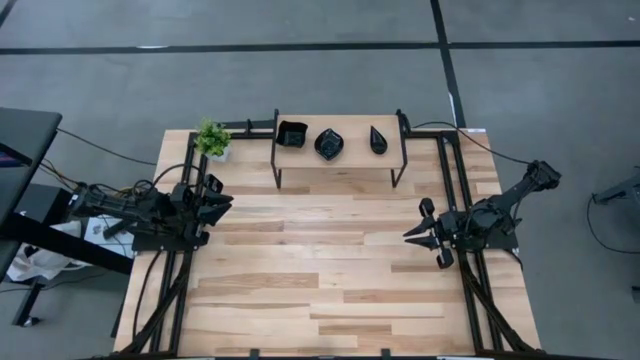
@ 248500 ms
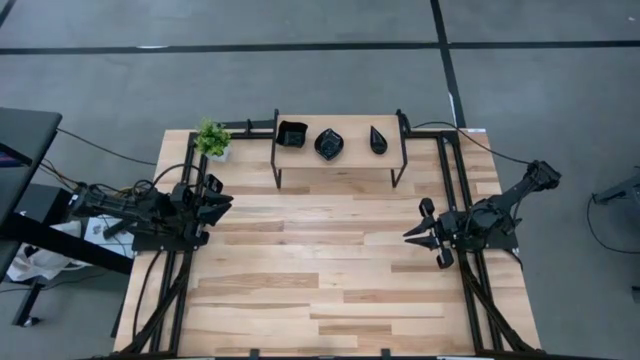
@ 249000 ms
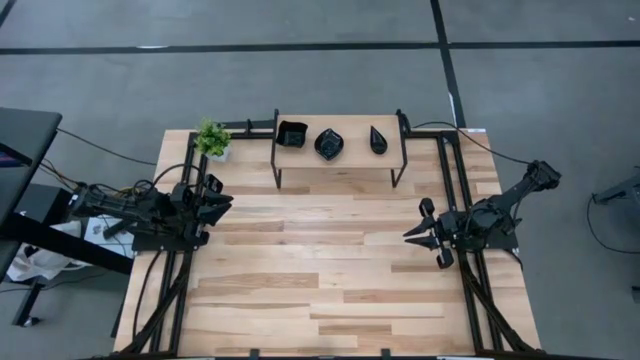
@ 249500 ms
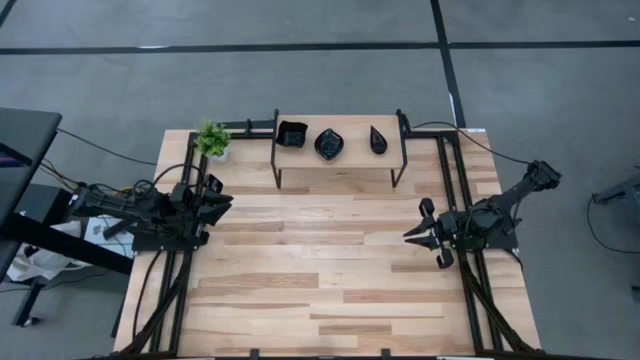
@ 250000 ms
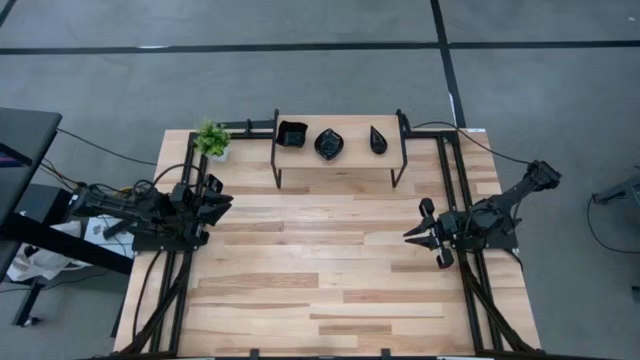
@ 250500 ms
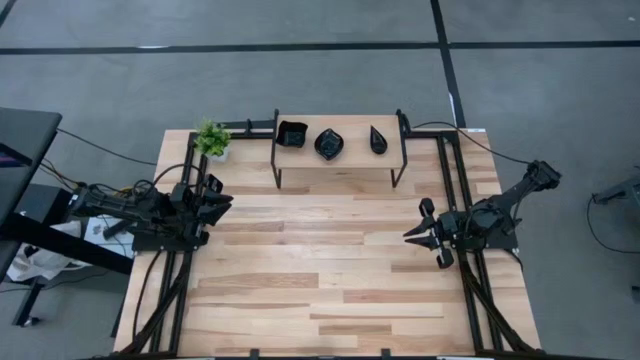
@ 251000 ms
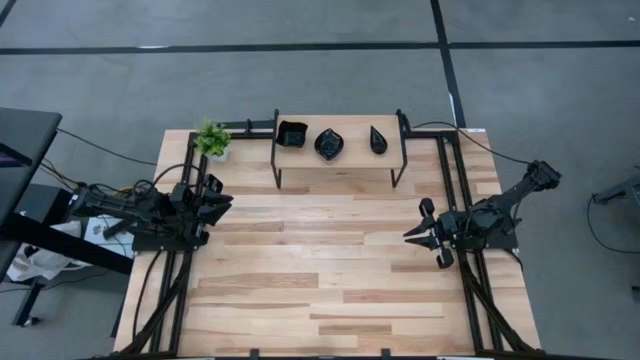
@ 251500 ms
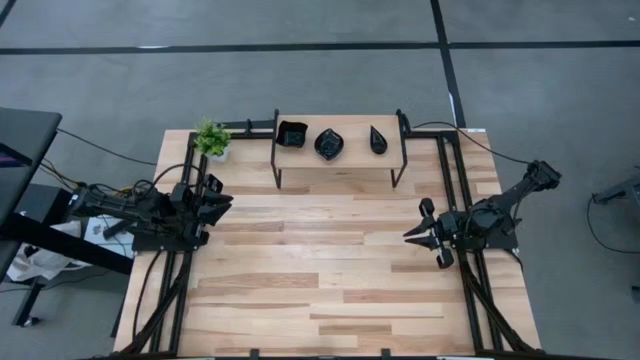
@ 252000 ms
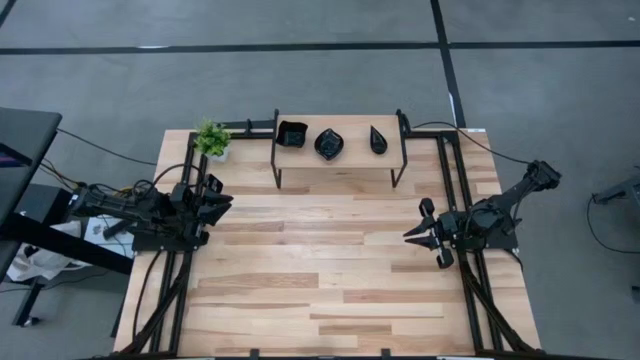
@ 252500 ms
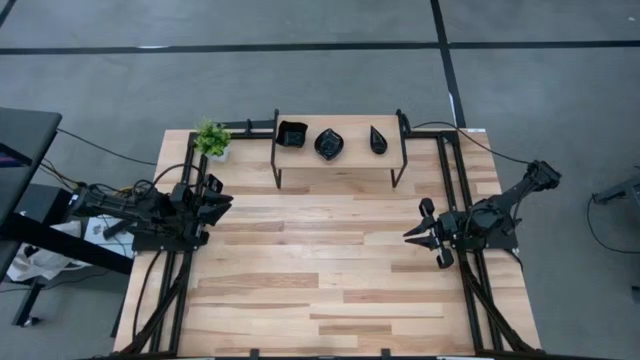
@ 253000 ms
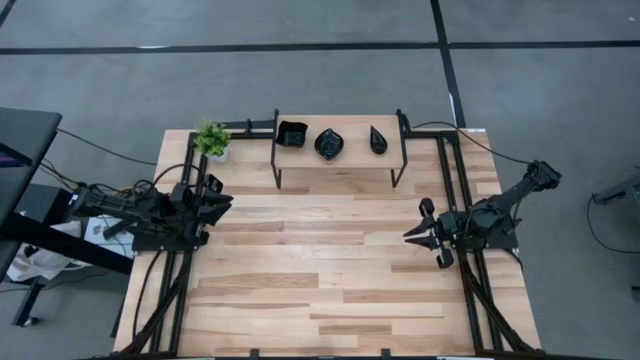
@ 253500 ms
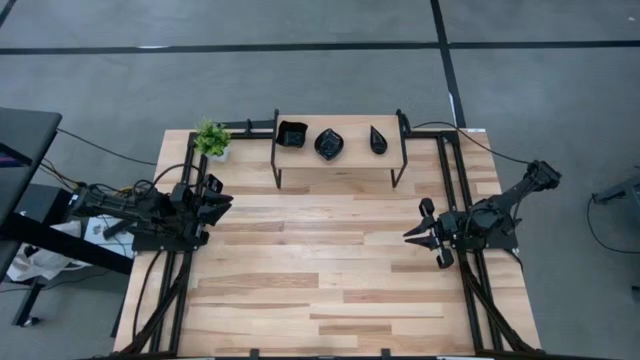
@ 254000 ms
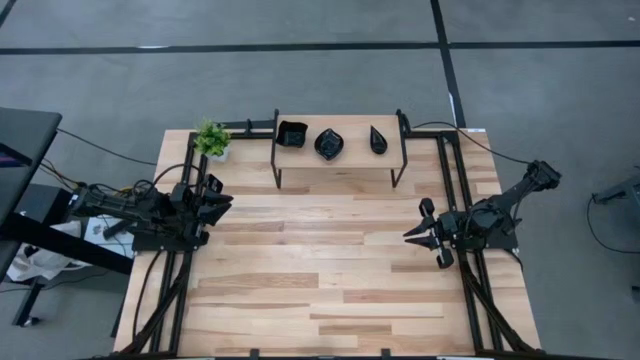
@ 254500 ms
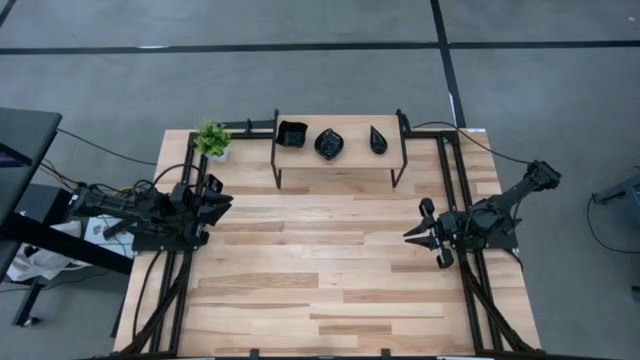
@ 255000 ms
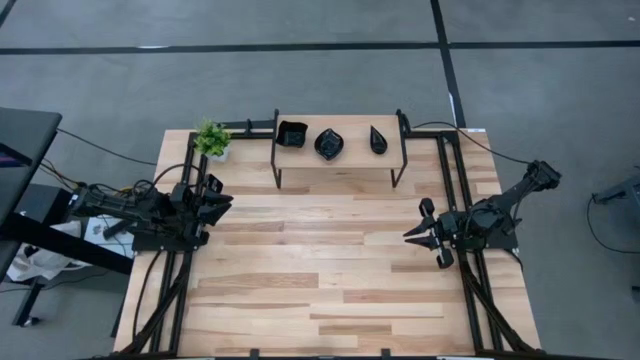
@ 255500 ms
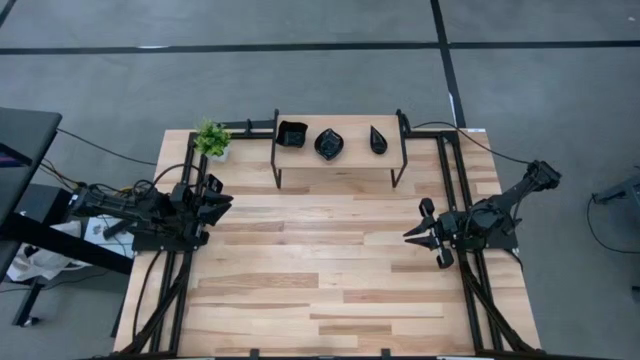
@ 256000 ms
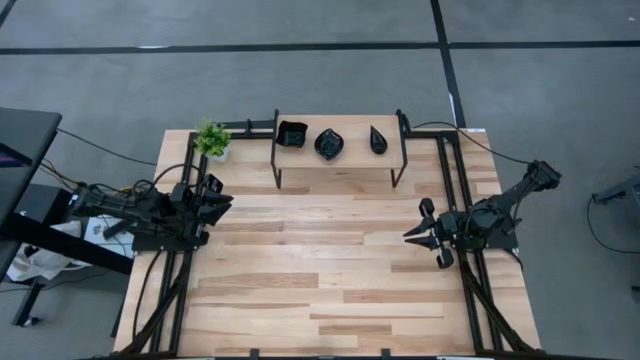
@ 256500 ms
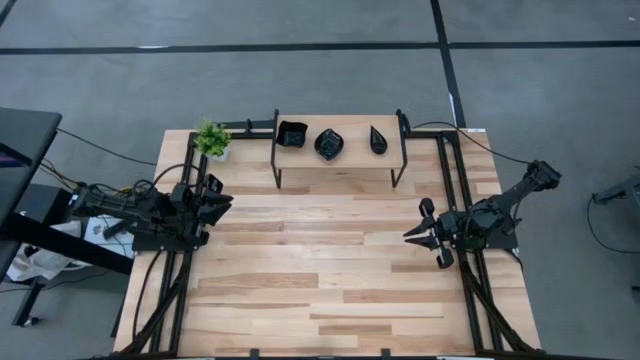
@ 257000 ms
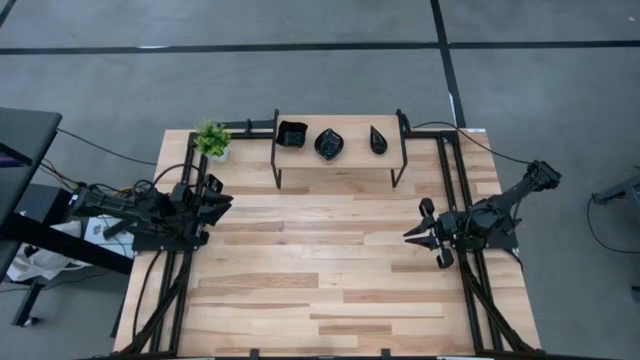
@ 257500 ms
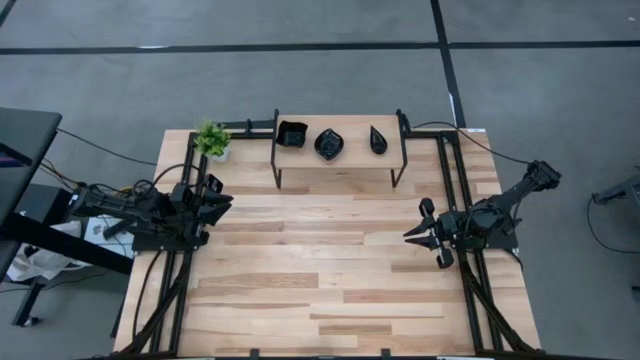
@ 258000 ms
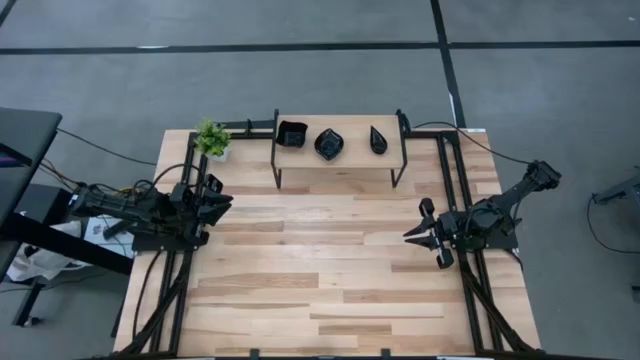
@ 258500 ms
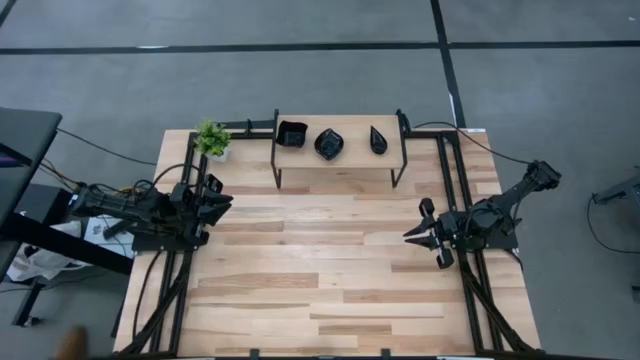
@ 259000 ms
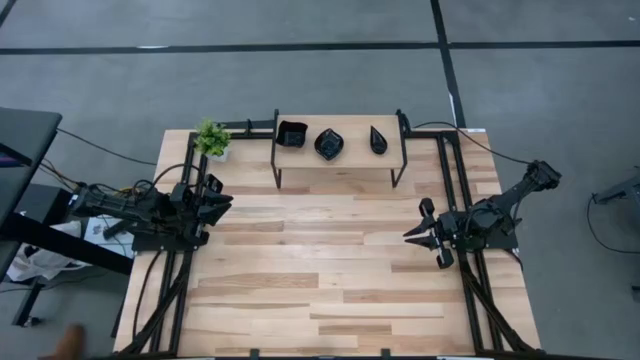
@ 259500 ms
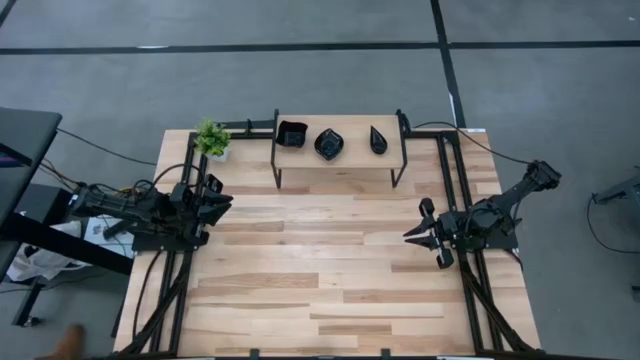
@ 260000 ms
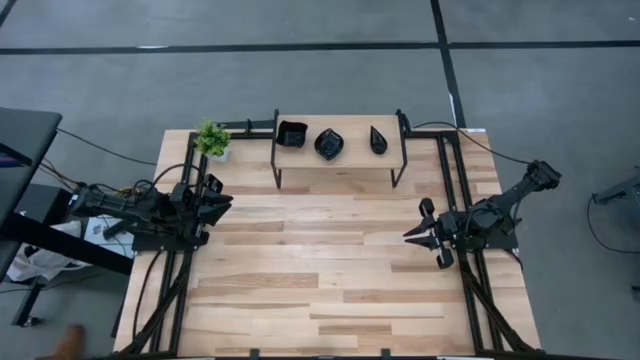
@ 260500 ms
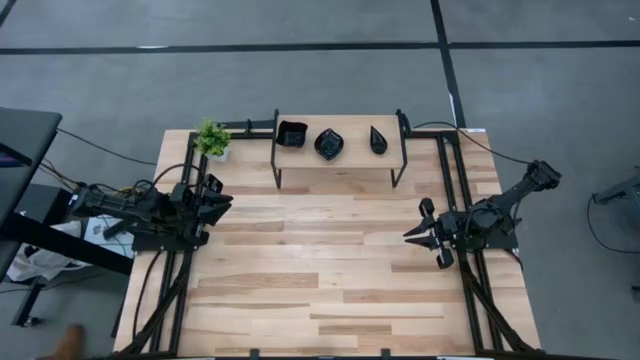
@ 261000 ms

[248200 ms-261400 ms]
Task: Pick & Place Mini shaped plates
Return to Home Position

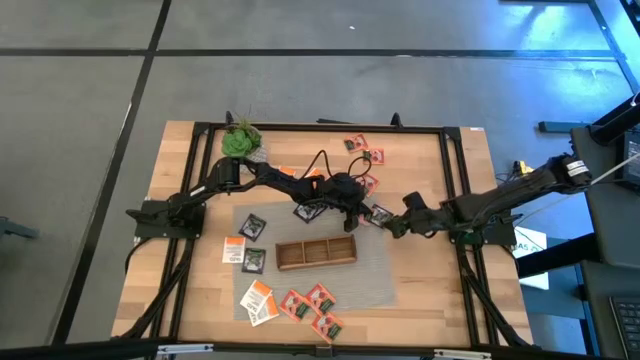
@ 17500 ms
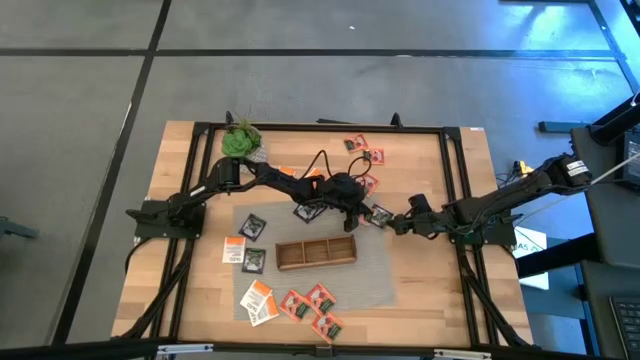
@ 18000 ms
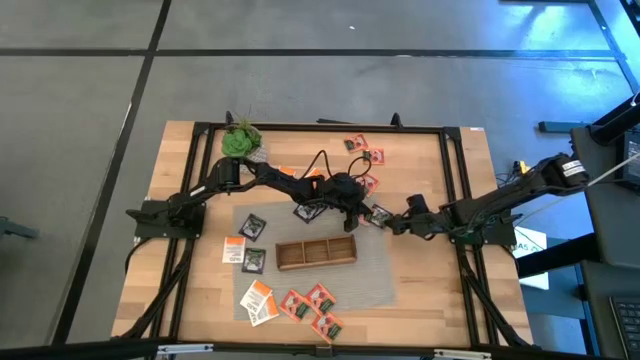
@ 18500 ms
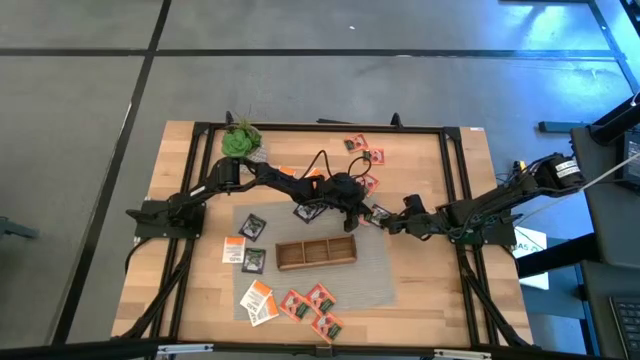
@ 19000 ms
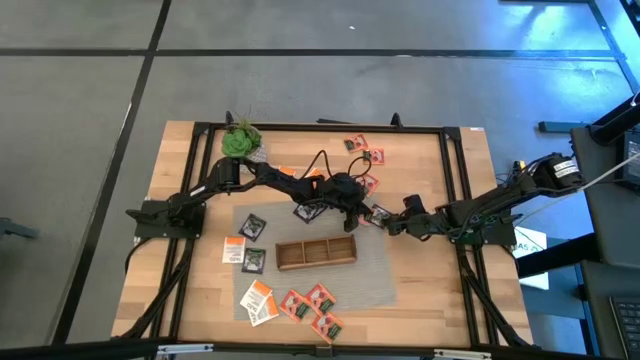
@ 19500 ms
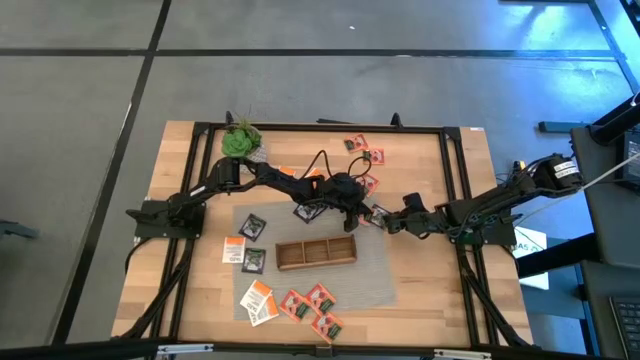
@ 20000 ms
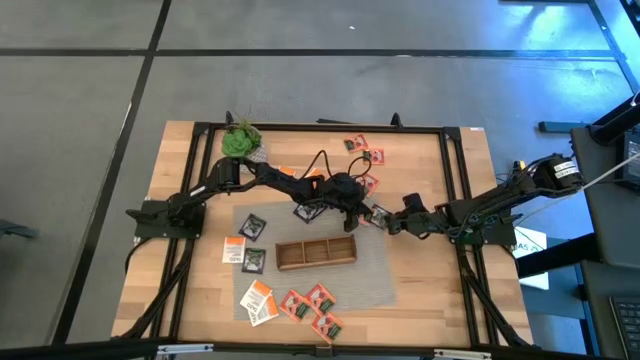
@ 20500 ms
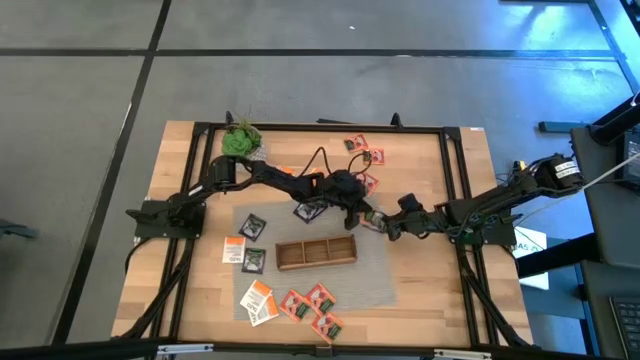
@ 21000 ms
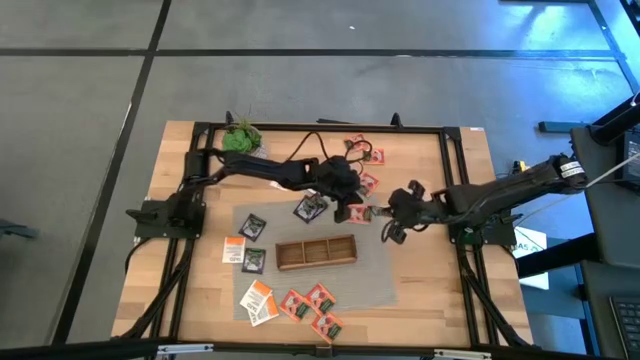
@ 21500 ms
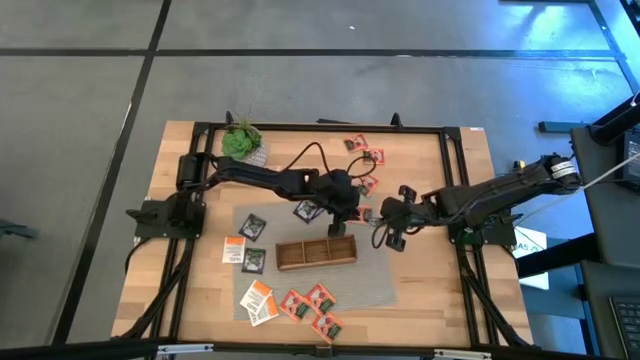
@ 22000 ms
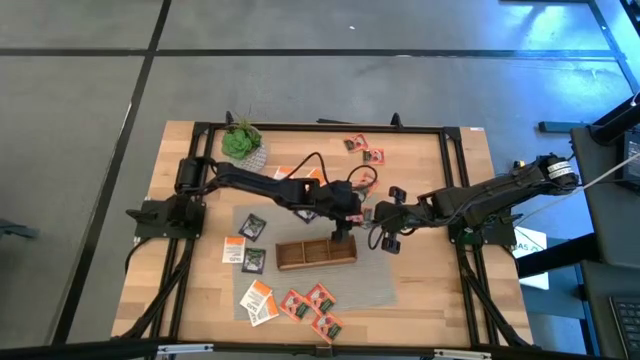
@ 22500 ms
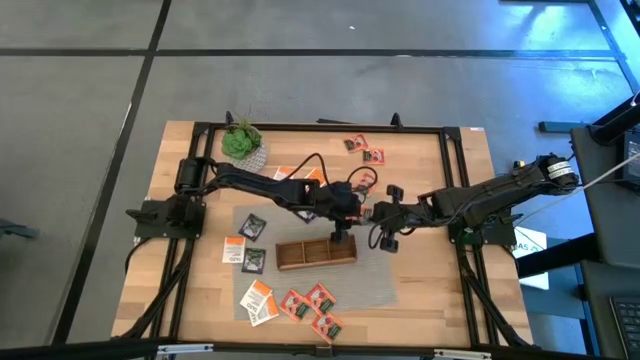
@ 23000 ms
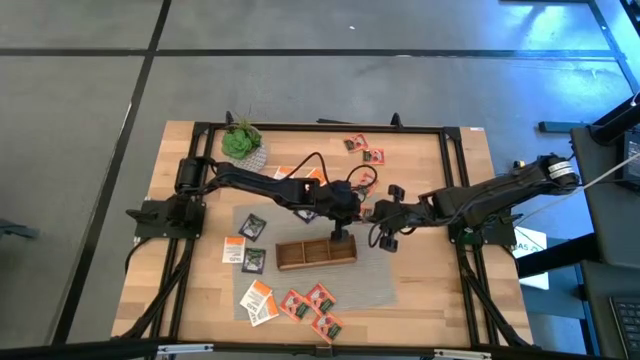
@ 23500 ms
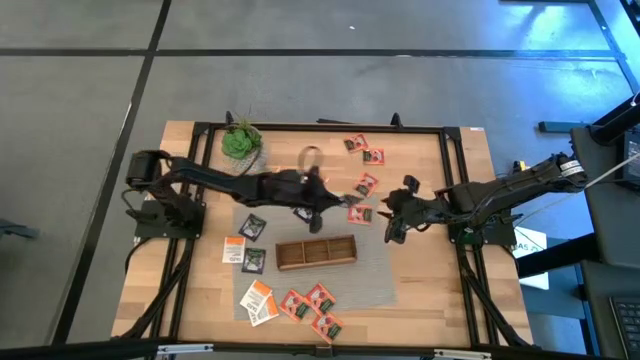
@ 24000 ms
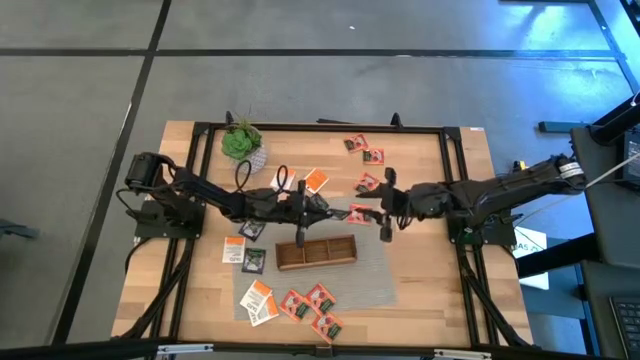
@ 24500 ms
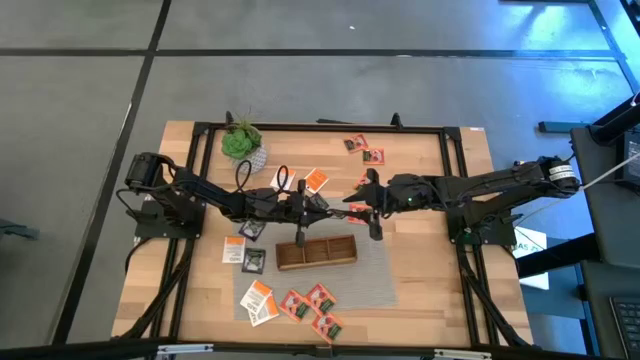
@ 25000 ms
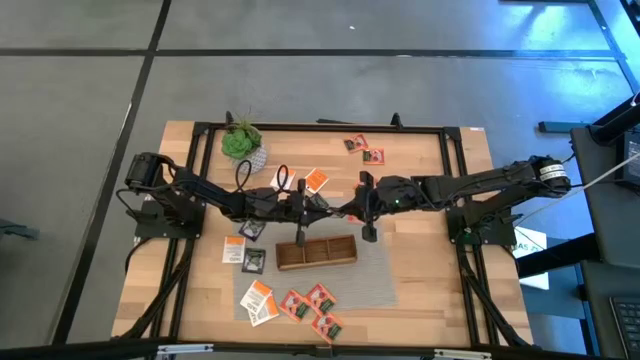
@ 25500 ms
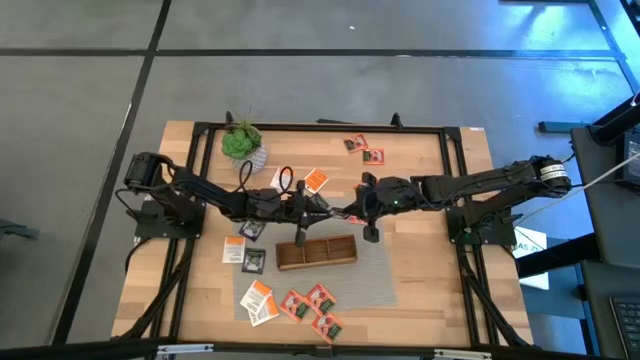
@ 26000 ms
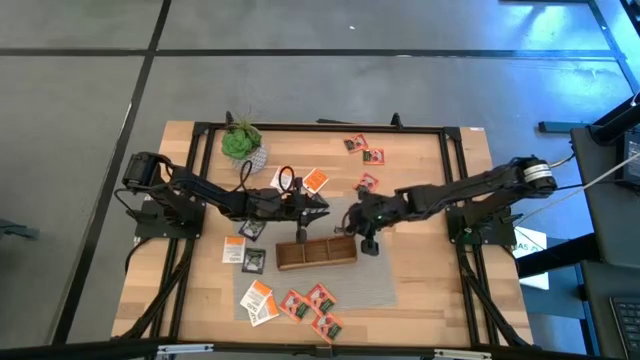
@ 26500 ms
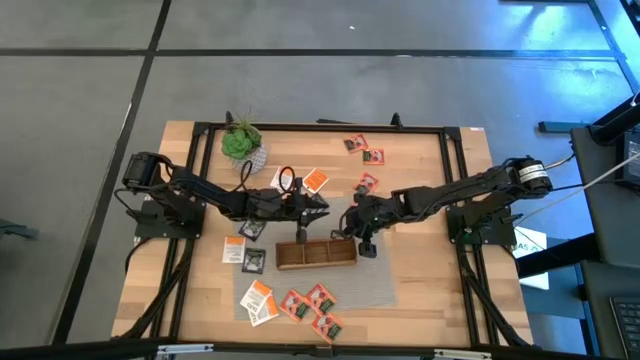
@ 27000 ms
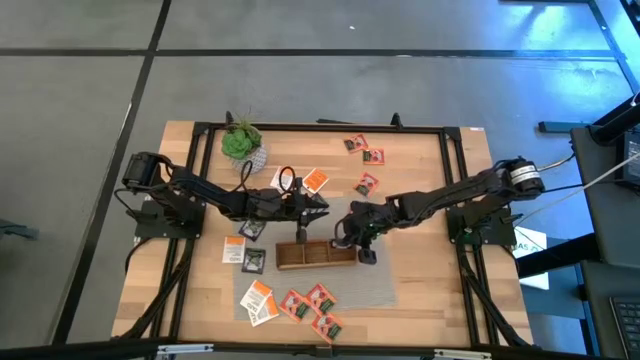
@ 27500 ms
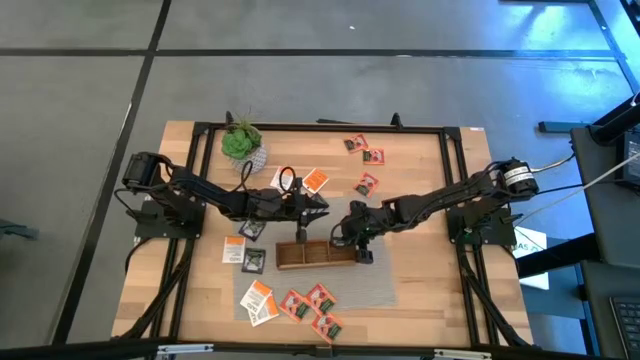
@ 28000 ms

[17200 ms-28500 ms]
Task: Pick & Place Tea
Put the purple tea bag into the right section of the wooden organizer
